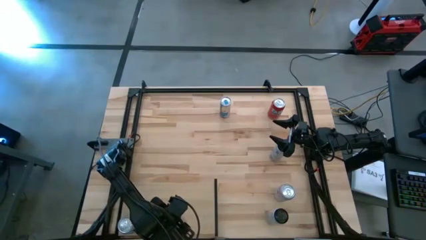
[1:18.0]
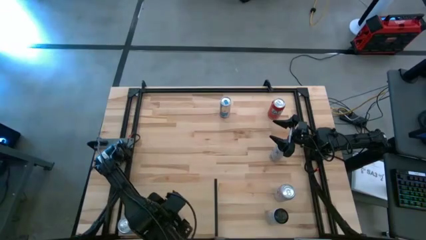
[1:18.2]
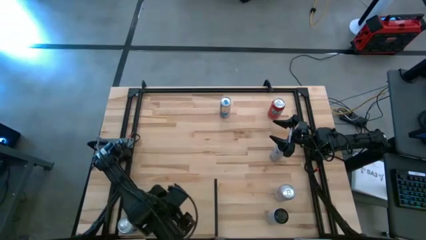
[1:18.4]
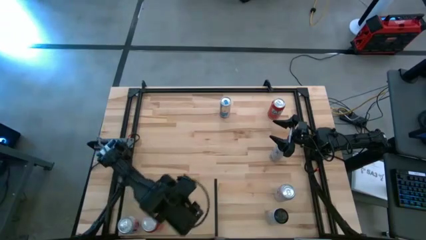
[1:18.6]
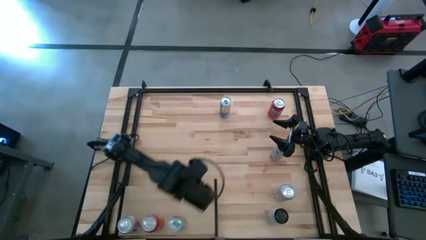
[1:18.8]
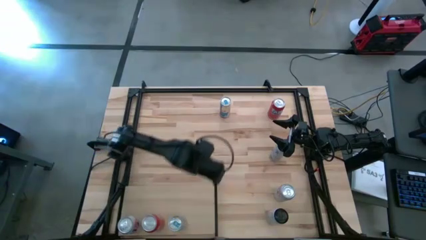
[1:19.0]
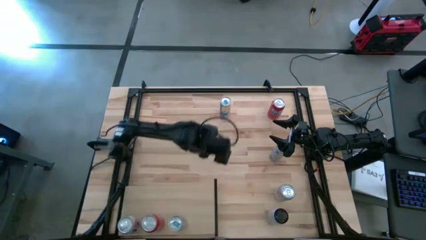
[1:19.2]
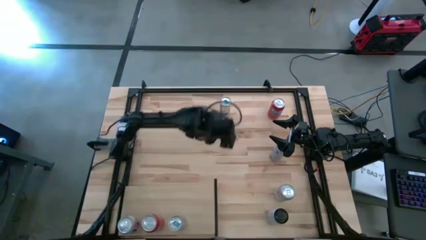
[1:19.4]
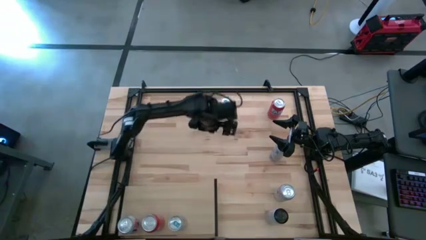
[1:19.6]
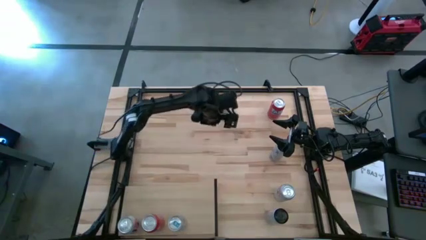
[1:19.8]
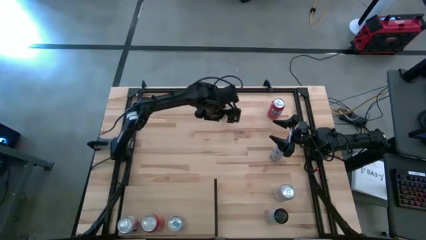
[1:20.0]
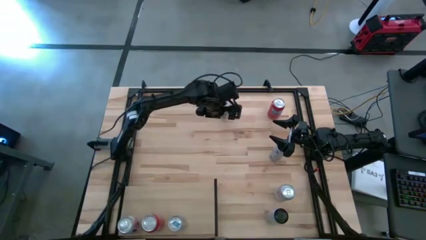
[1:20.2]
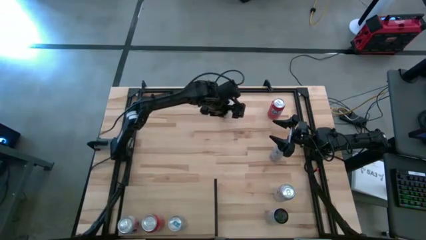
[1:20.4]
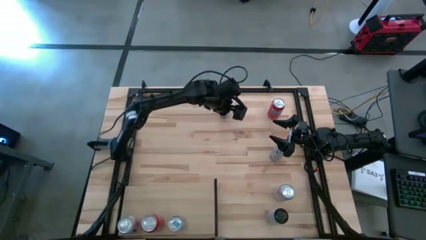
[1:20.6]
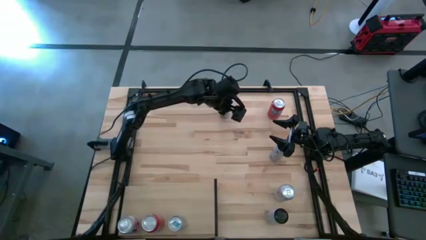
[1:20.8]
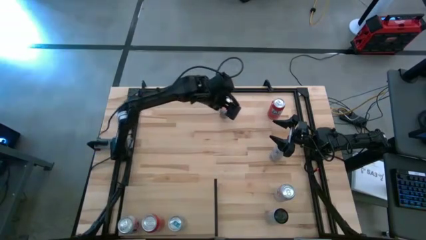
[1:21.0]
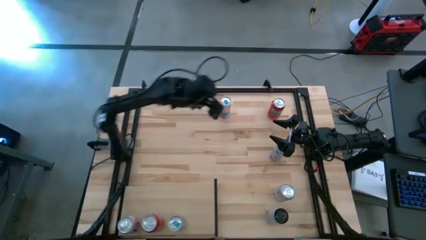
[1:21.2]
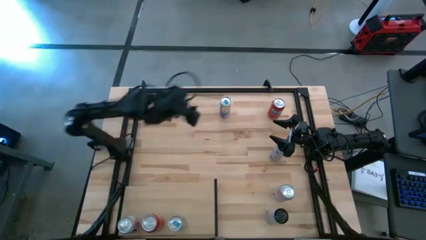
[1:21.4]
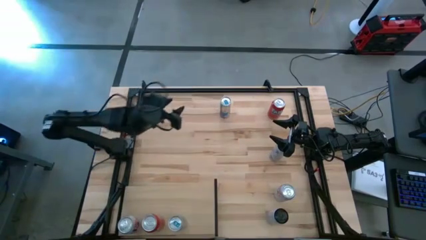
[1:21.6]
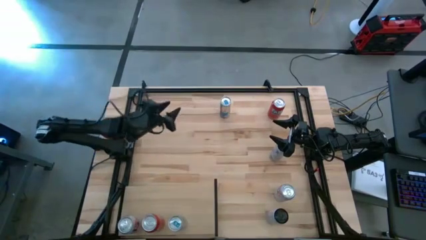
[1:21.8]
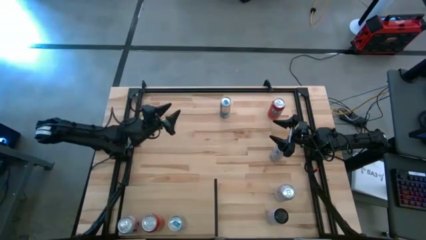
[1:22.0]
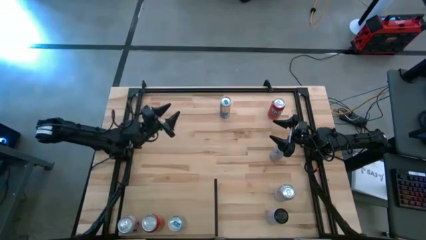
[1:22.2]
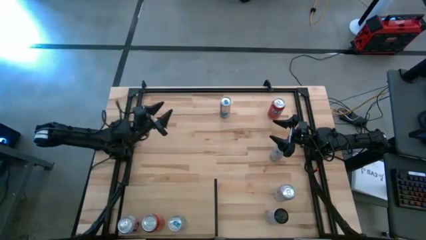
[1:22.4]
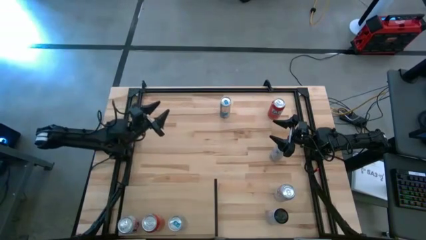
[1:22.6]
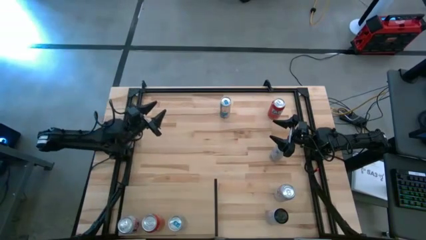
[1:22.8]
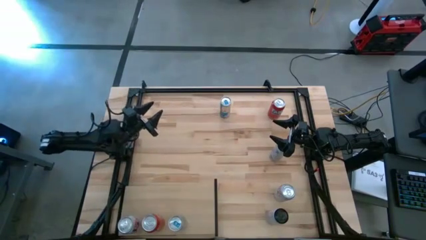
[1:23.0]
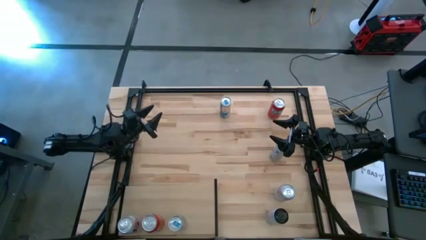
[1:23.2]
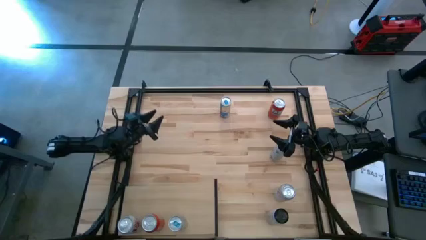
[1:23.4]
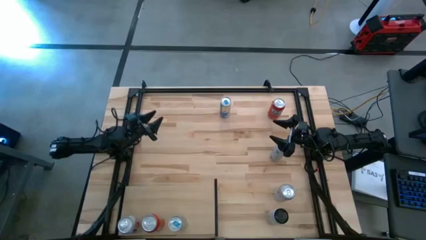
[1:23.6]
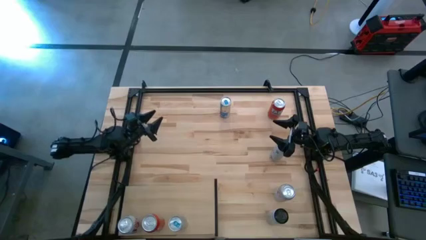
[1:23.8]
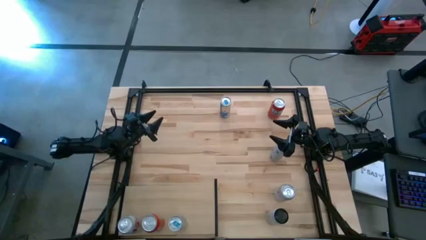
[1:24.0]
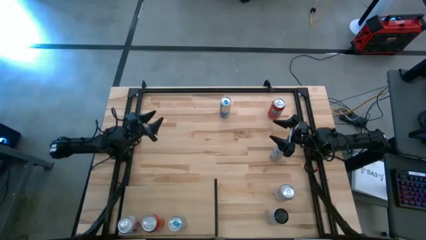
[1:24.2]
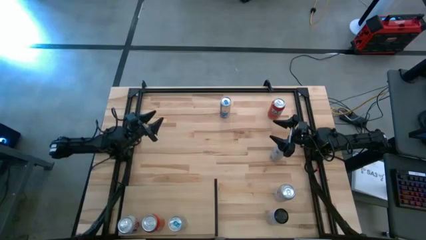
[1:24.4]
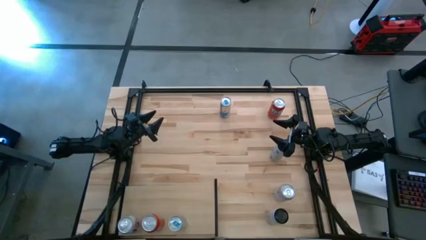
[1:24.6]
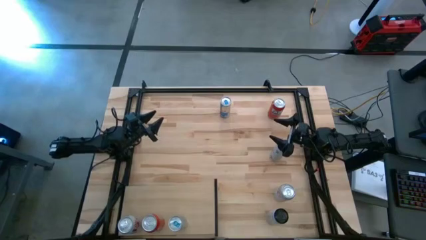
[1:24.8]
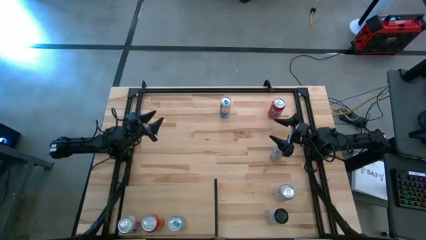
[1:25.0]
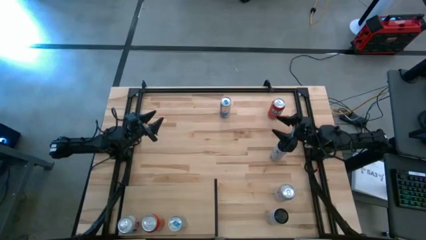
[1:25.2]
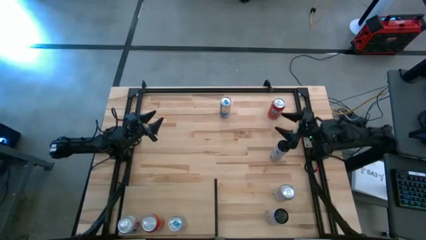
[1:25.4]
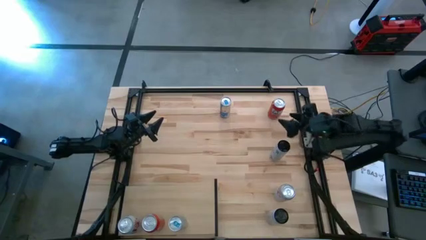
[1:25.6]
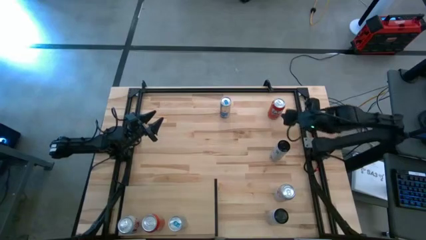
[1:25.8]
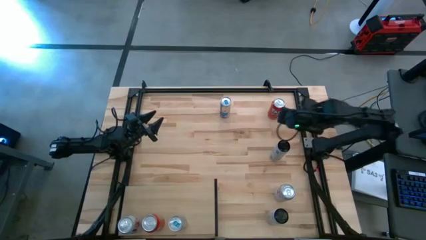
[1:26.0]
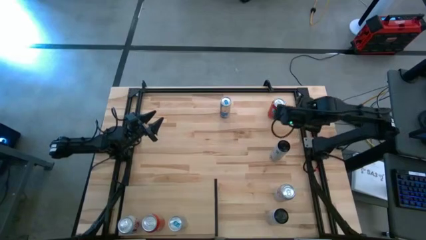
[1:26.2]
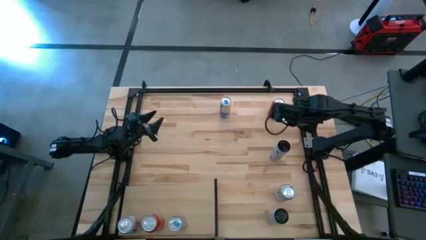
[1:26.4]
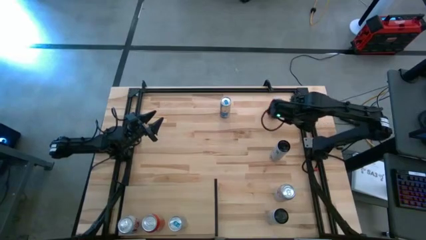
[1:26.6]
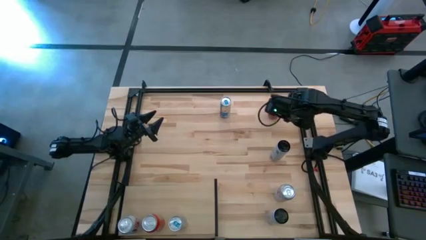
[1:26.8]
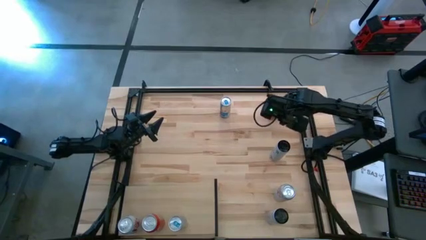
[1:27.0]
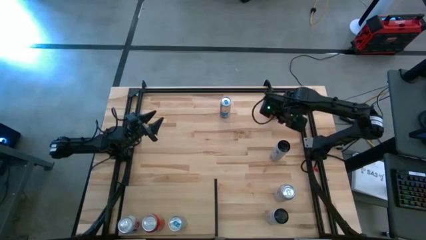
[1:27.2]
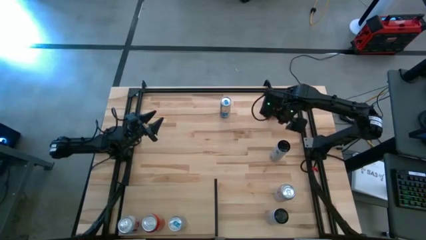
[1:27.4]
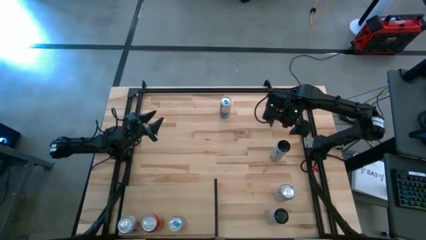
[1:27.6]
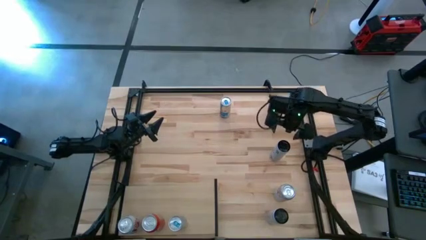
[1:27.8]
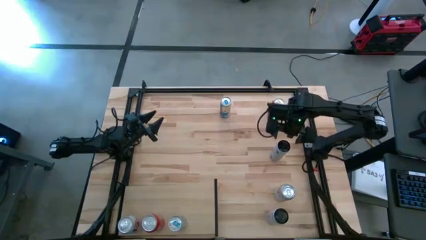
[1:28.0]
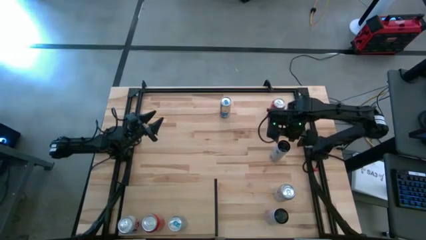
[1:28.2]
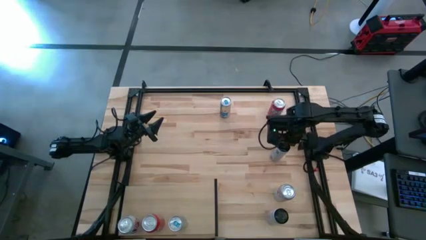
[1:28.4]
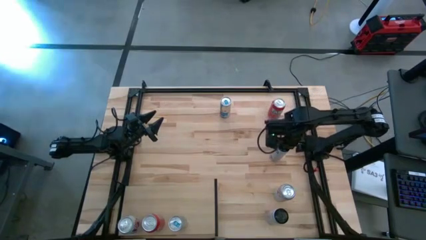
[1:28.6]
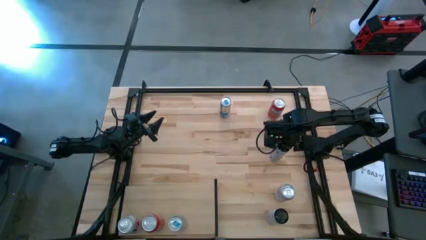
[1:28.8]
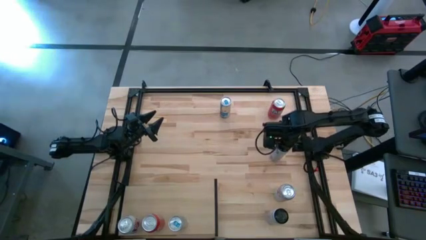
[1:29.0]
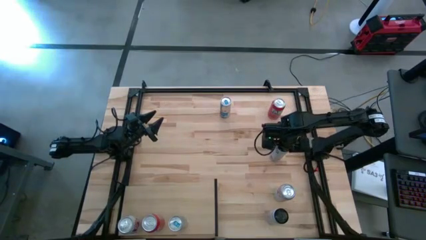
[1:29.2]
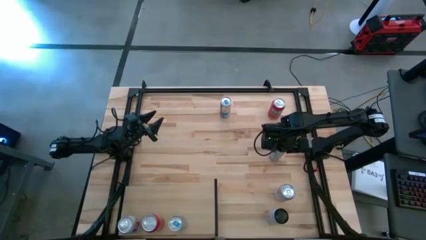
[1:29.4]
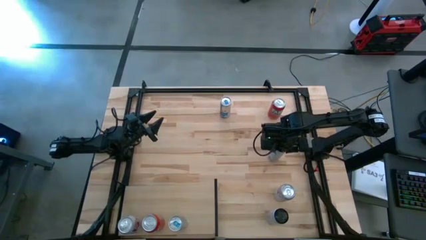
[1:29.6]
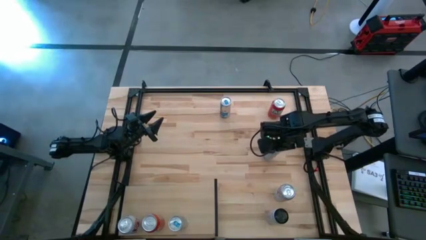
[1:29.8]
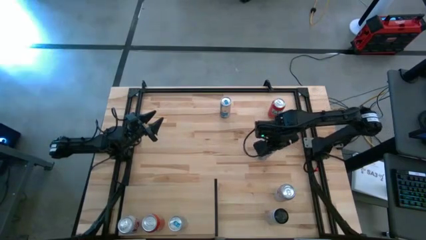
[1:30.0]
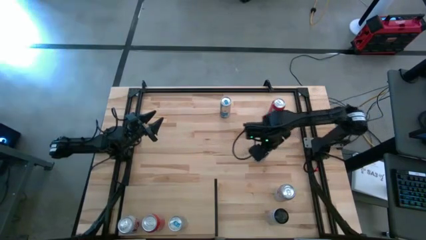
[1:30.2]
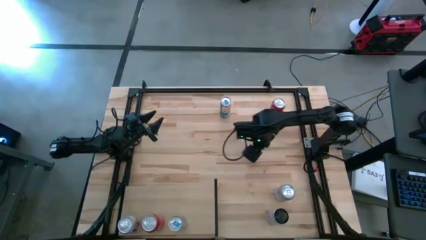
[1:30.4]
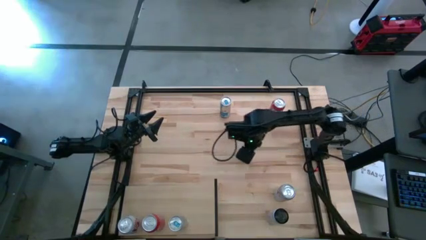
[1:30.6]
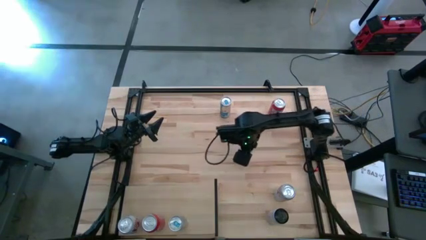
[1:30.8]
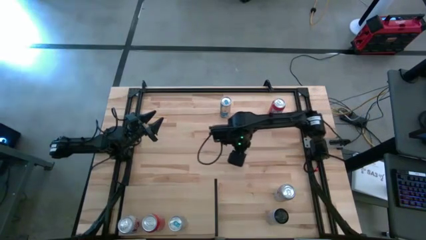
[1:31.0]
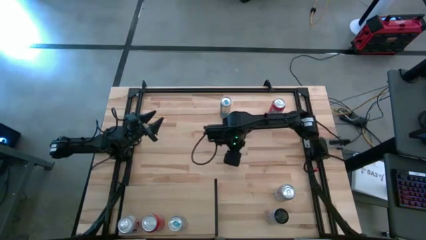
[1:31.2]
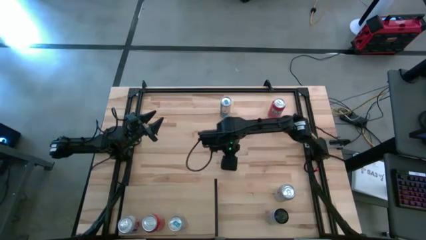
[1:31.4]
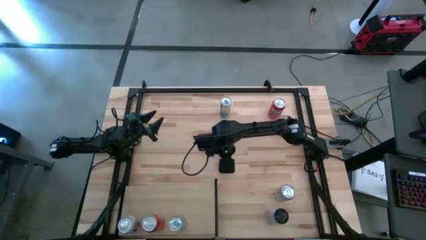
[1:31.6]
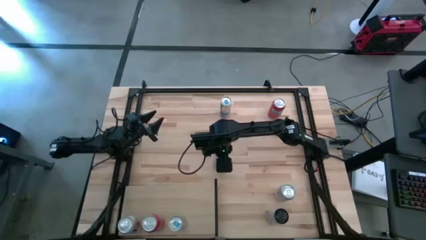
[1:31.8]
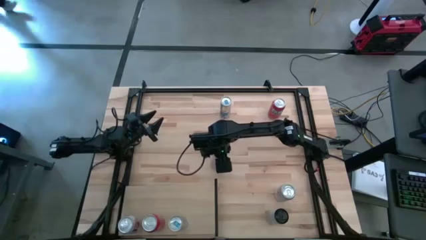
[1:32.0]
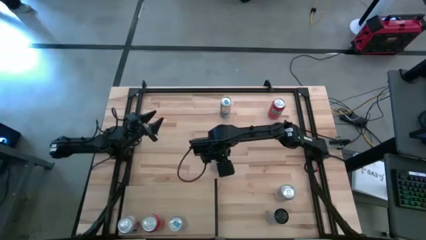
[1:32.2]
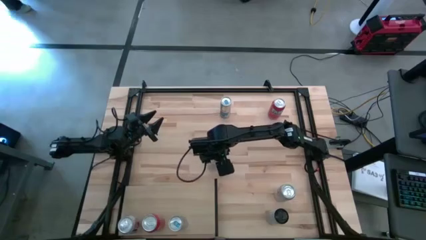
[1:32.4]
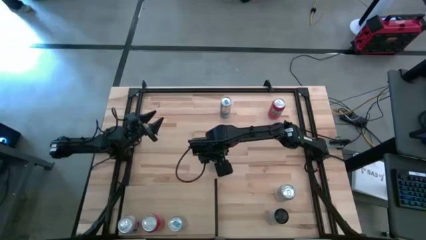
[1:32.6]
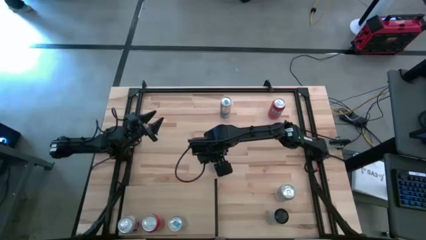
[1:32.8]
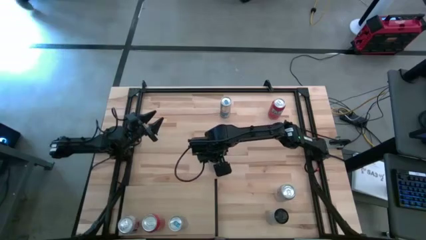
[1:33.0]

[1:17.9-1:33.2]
Task: Place canned beverage on shelf
Move the top white pink soda can to the center of the table

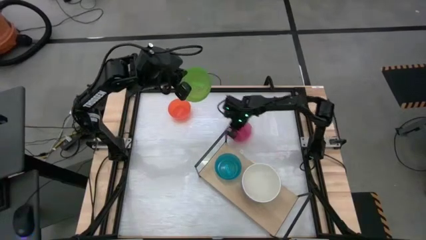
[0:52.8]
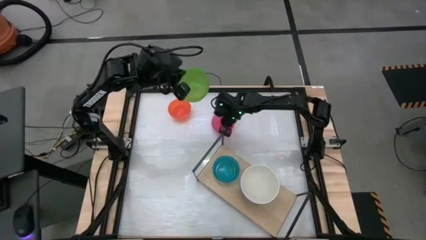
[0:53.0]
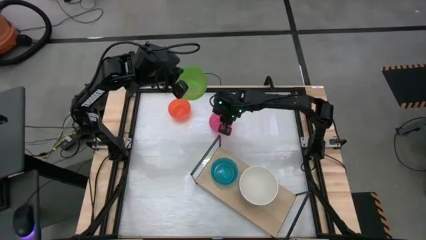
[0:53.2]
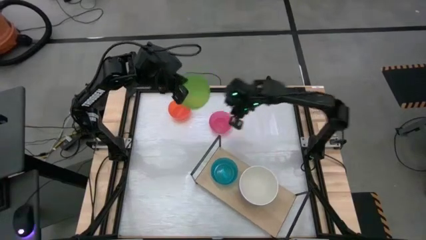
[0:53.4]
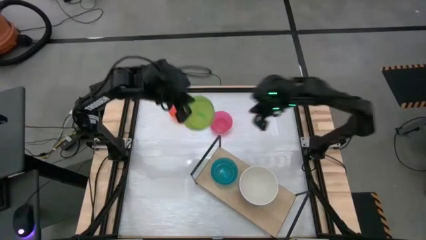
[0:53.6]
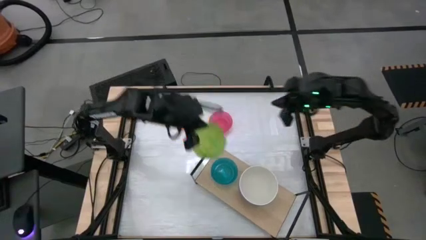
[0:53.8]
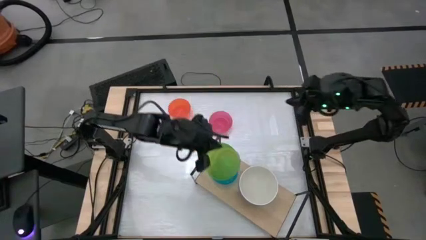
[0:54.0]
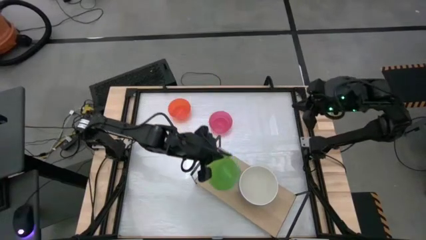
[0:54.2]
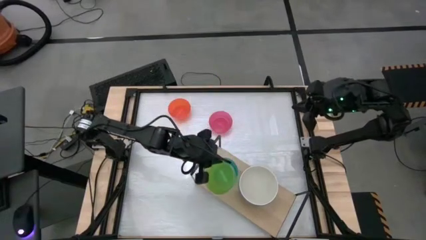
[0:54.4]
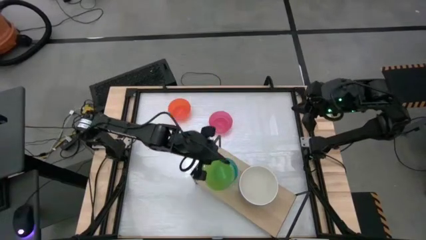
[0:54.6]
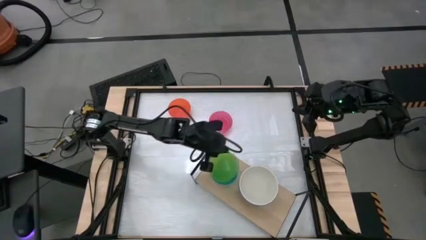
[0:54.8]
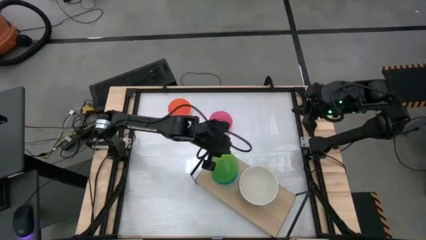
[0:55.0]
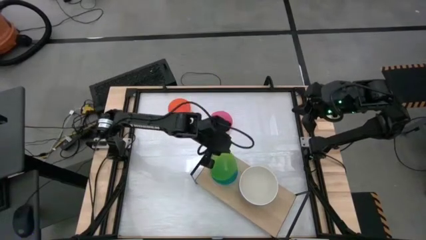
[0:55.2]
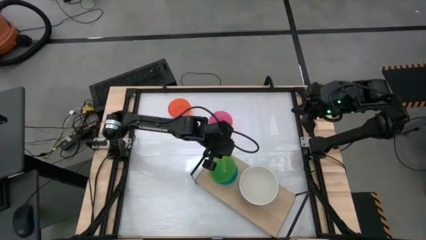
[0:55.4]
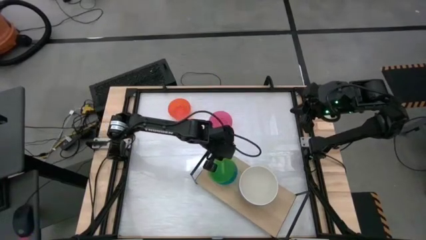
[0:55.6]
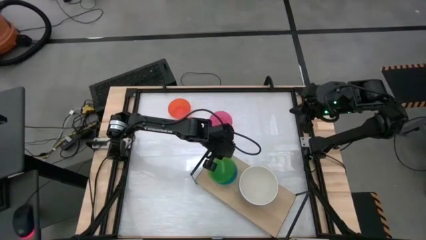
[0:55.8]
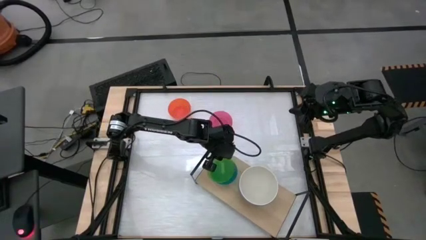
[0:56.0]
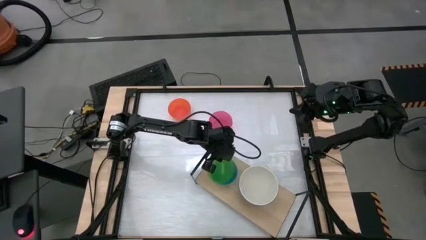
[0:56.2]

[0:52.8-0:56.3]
Task: Place and stack bowls onto a shelf
Stack the small green bowl on the small blue bowl on the shelf
